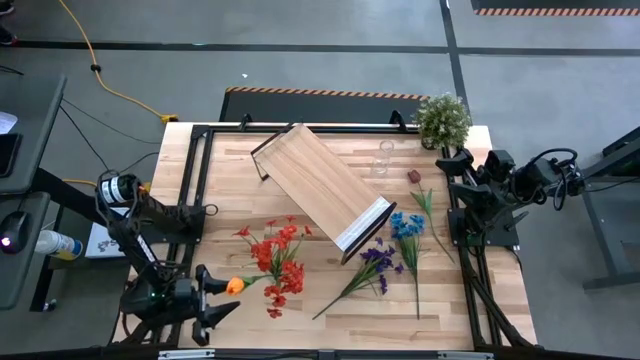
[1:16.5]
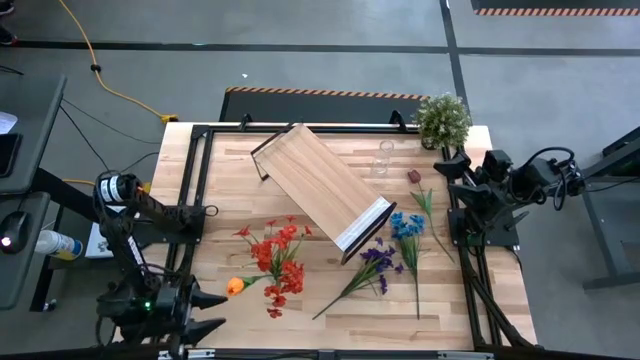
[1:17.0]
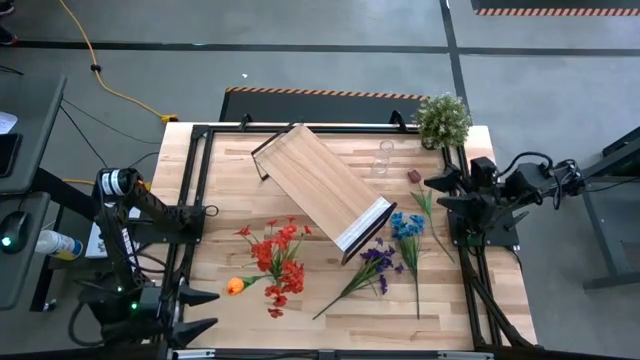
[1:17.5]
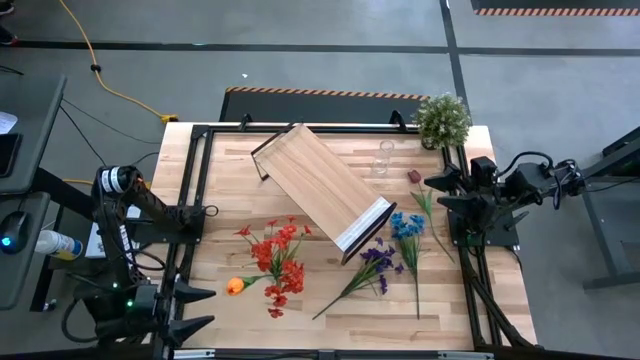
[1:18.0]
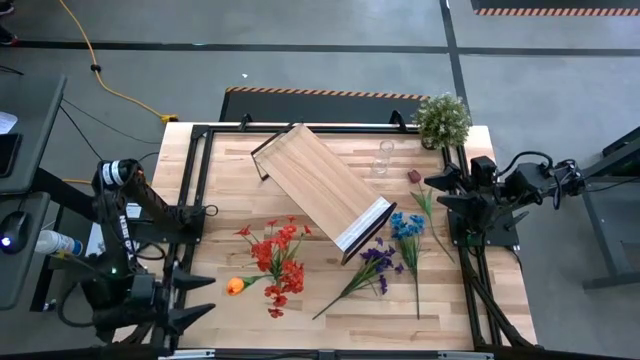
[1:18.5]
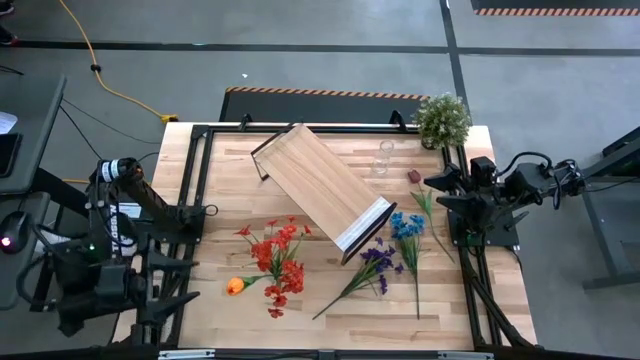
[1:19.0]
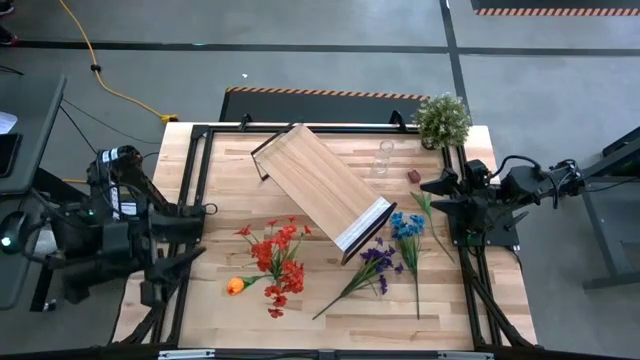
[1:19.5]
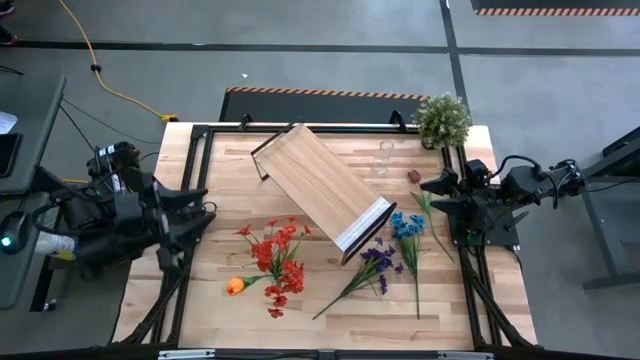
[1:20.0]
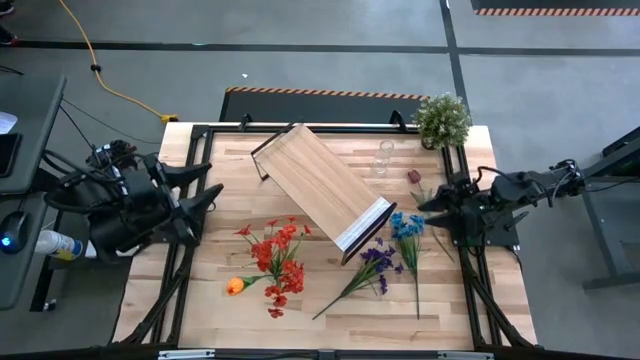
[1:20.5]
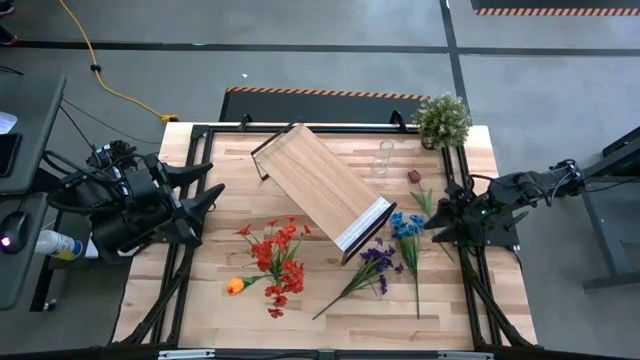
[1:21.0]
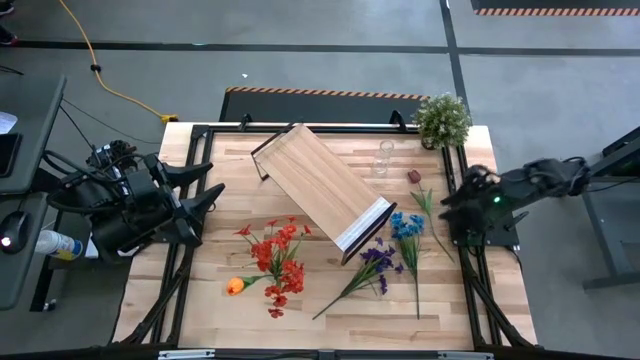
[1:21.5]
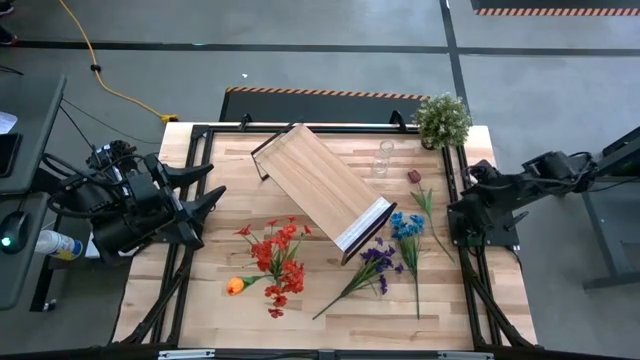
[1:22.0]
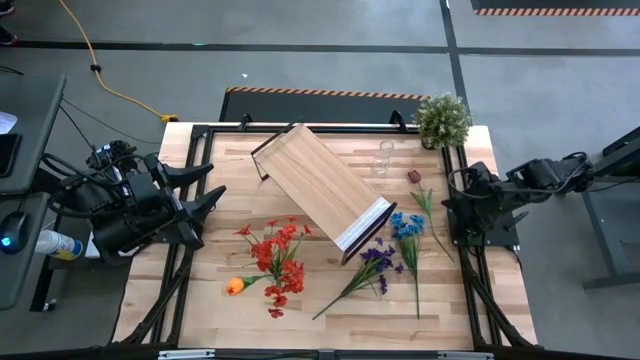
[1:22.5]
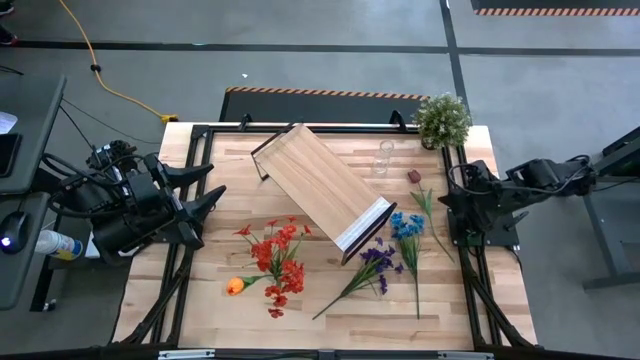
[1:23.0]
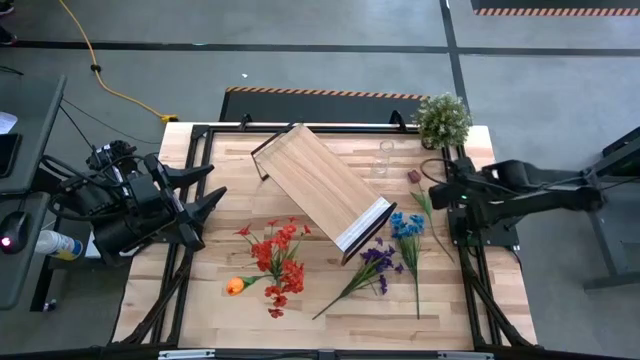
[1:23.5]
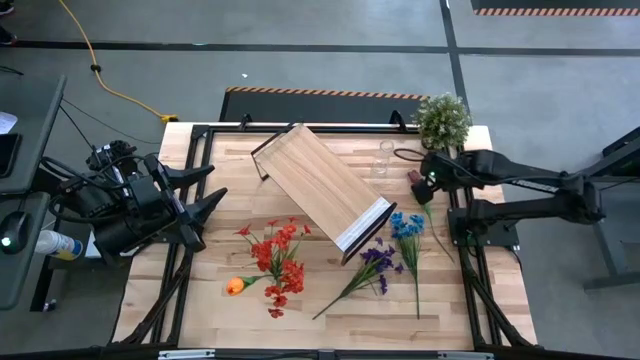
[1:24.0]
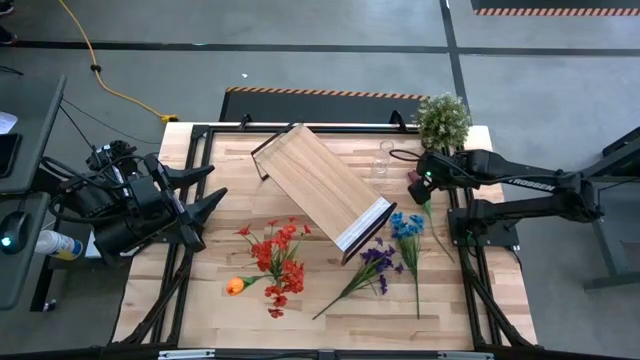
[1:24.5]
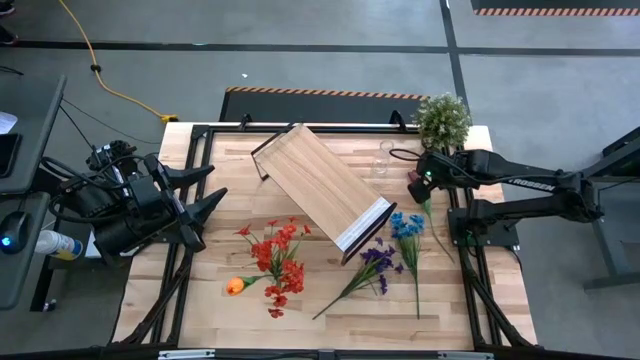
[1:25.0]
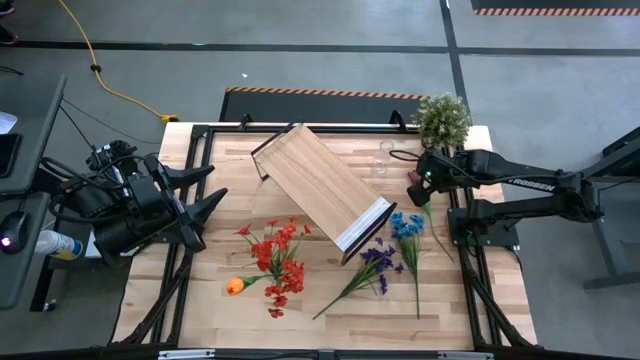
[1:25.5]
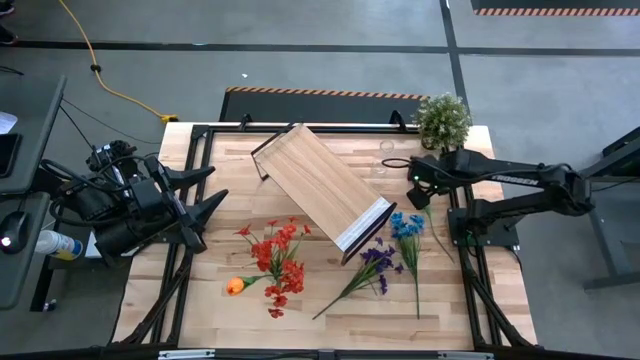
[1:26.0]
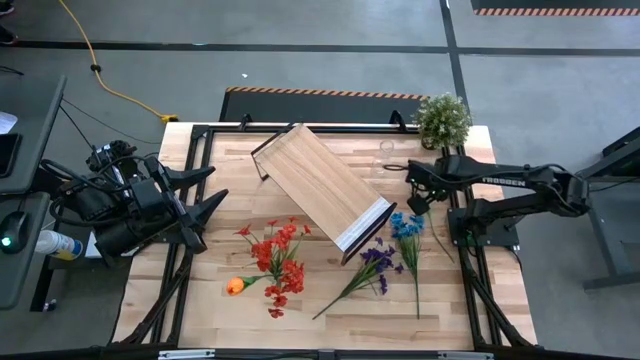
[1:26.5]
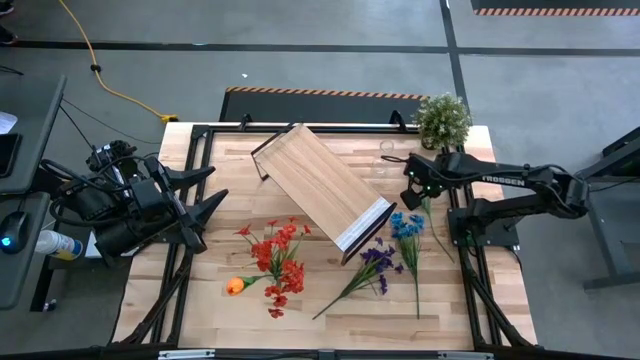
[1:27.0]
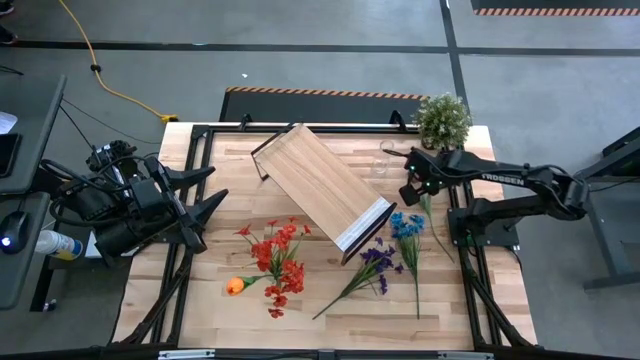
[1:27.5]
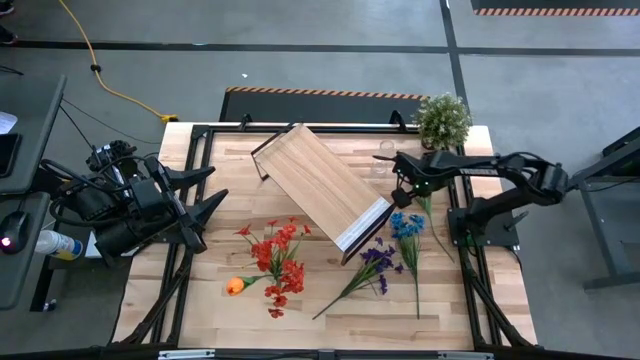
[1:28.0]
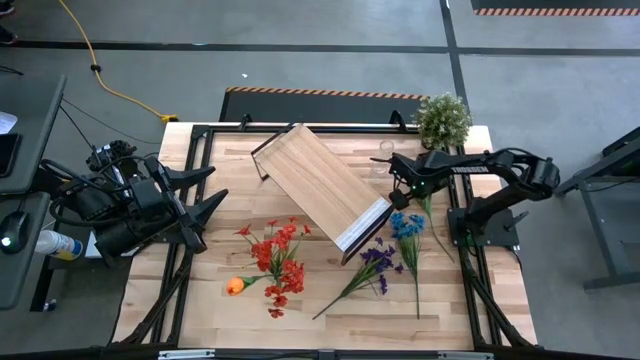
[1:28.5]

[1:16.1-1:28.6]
Task: Pick and place flowers into a vace then onto a shelf
Put the red tulip into the top transparent vase

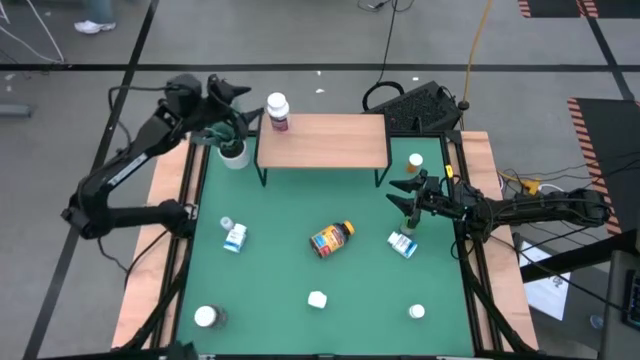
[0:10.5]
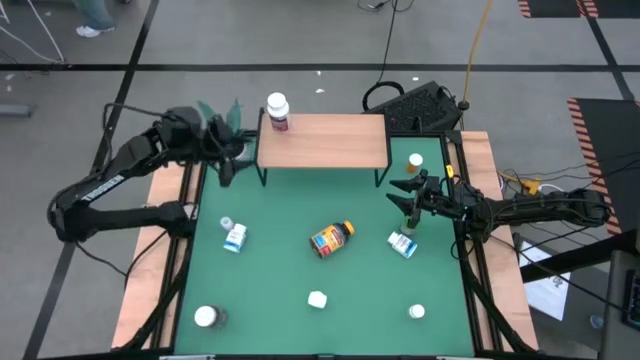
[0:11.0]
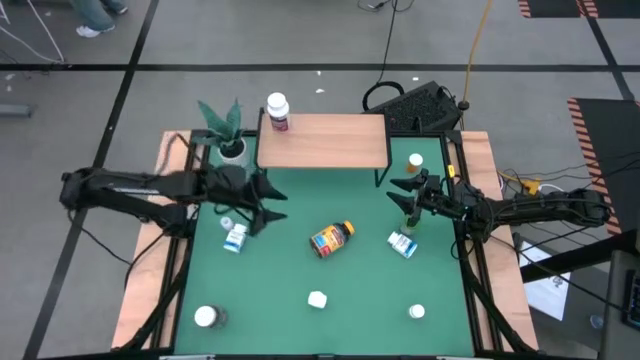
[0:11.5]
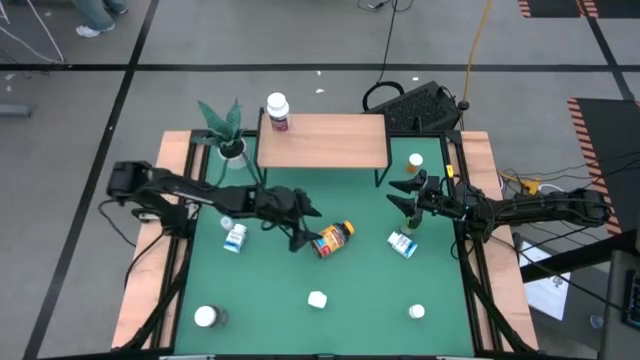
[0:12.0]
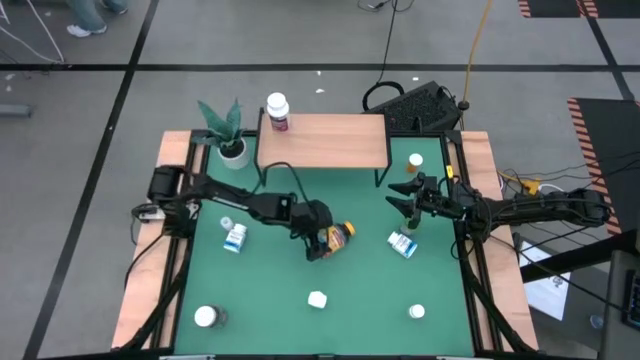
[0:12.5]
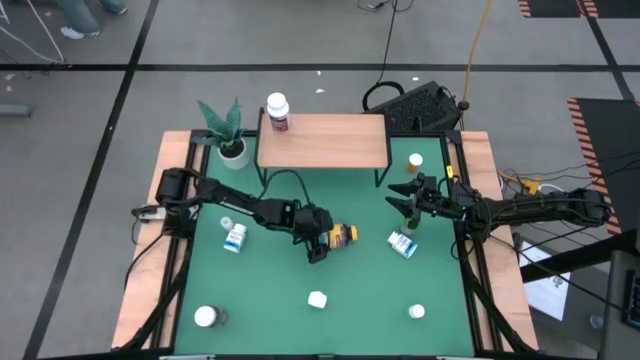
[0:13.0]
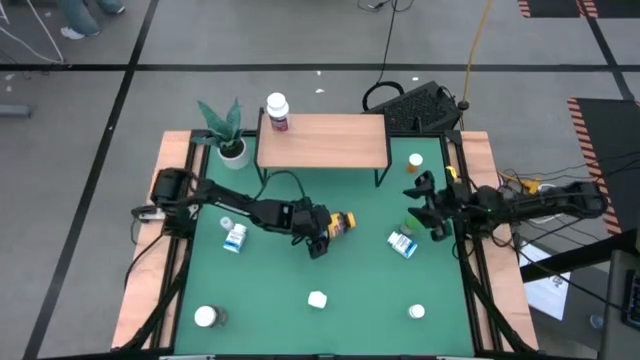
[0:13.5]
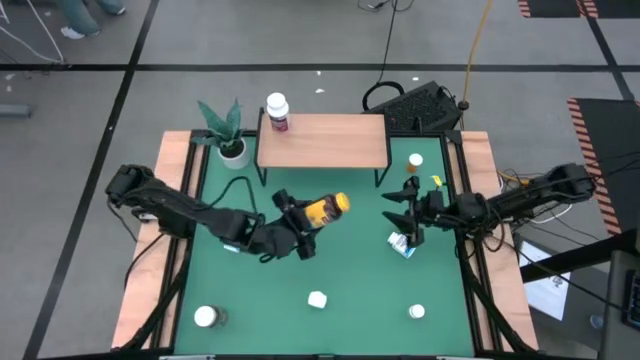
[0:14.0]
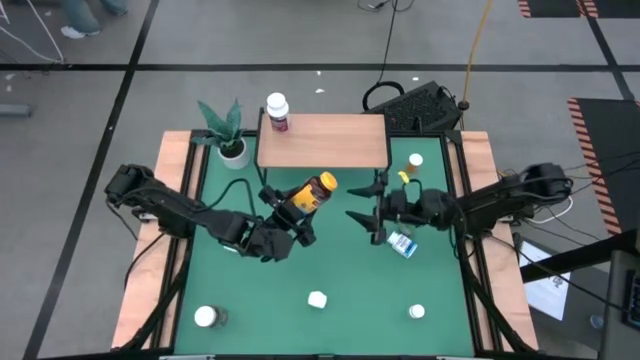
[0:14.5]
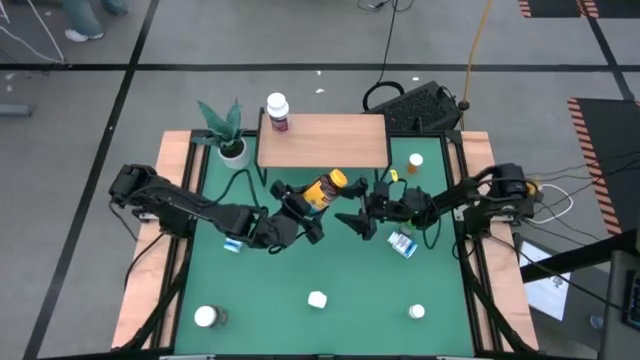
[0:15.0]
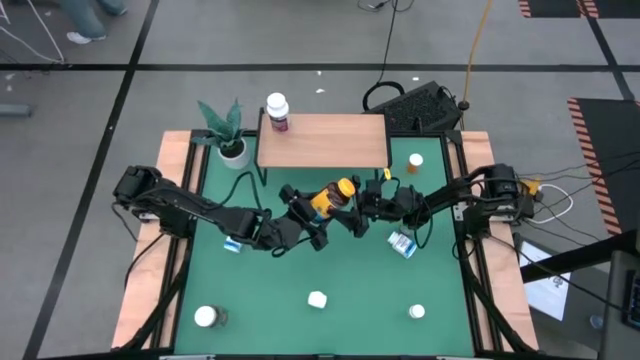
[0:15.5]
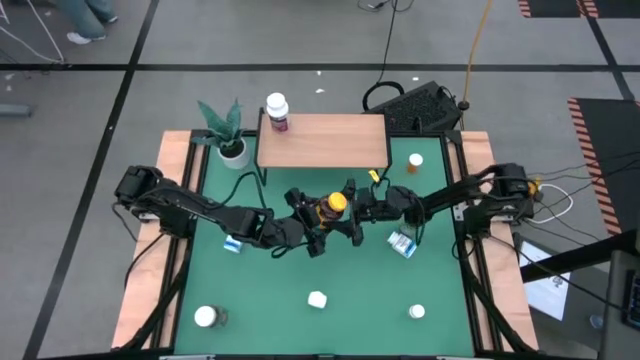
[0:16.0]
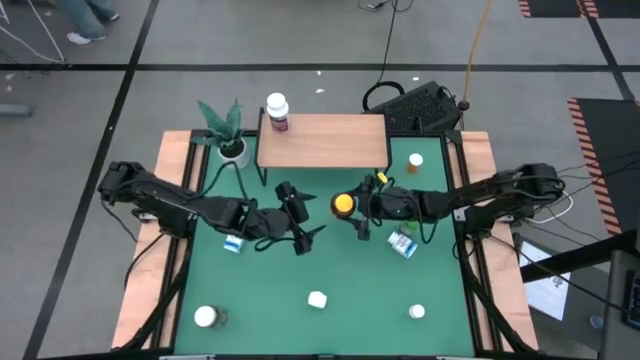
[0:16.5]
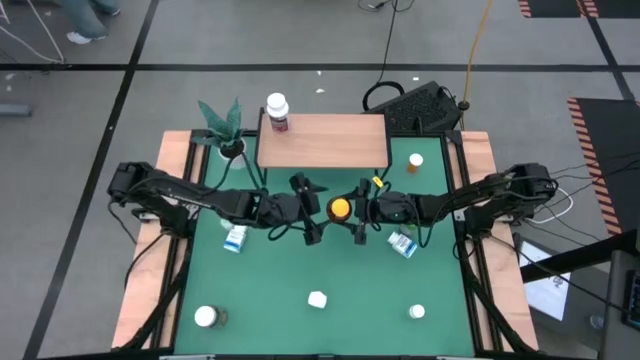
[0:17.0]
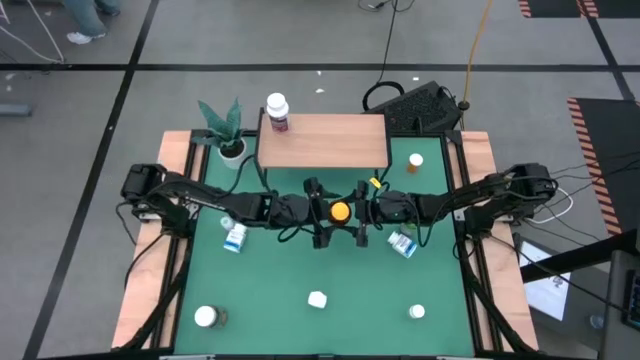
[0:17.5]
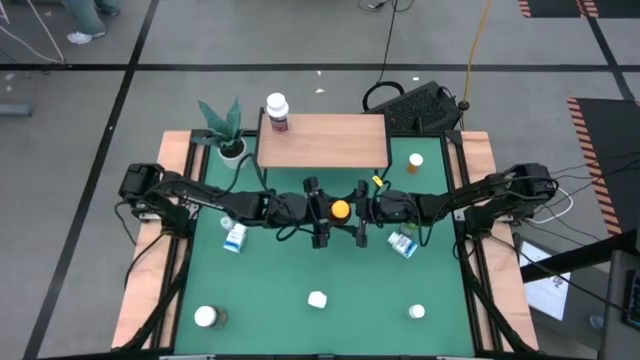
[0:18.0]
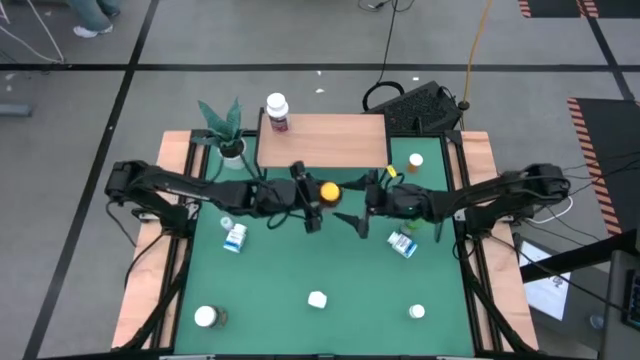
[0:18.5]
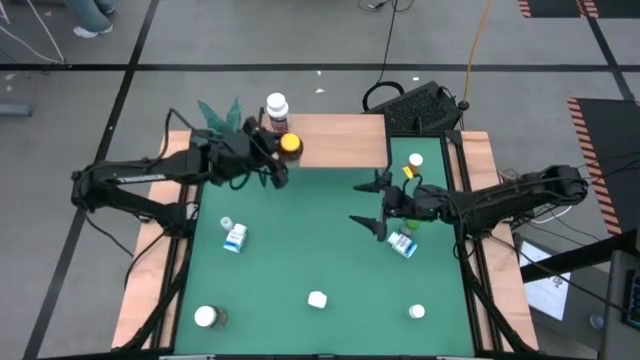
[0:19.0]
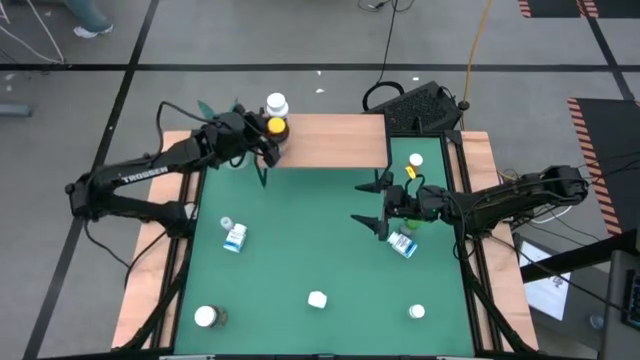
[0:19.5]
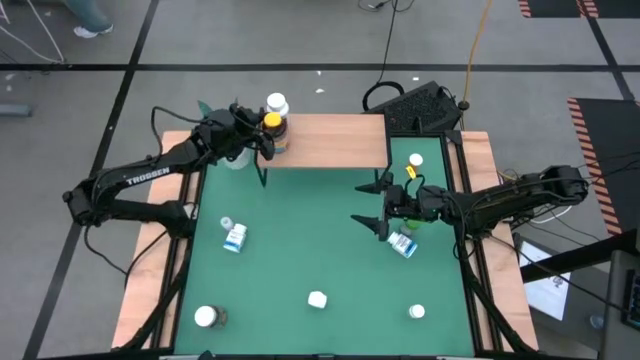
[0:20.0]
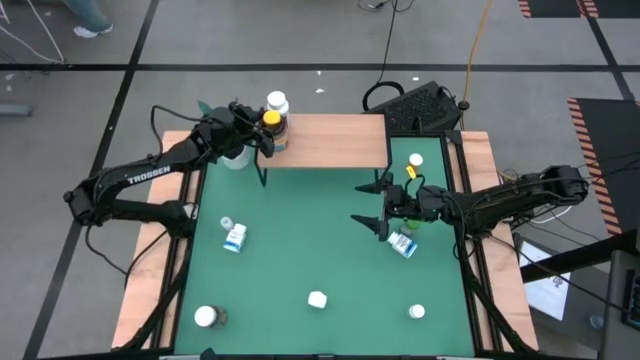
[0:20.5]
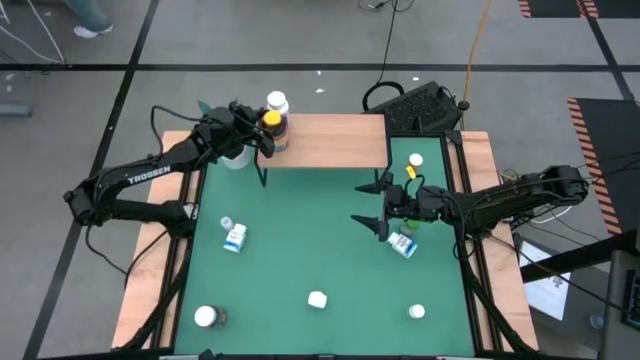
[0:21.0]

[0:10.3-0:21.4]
Task: Pick and place medicine bottles onto shelf by color
Put the big yellow pill bottle on the shelf aligned with the white purple pill bottle
